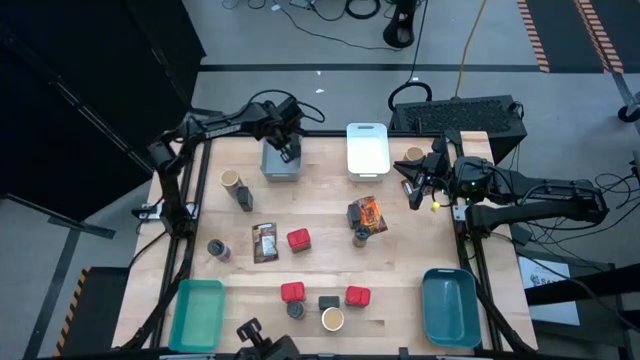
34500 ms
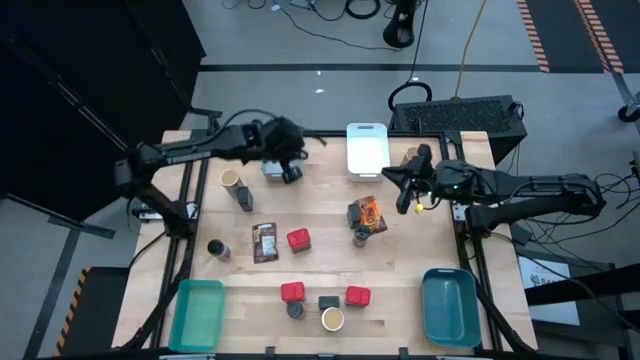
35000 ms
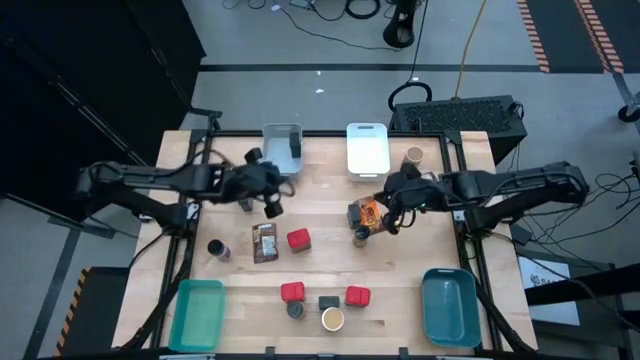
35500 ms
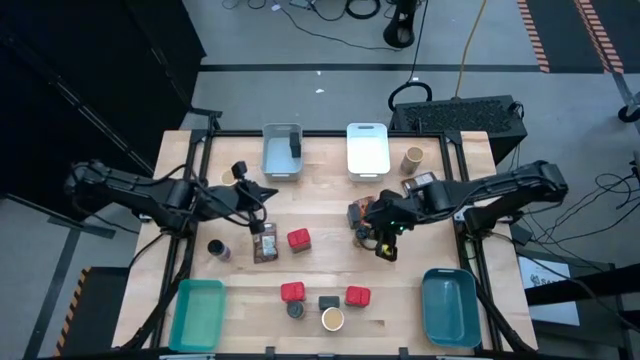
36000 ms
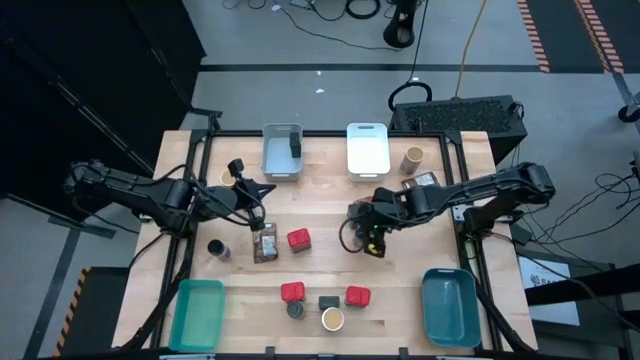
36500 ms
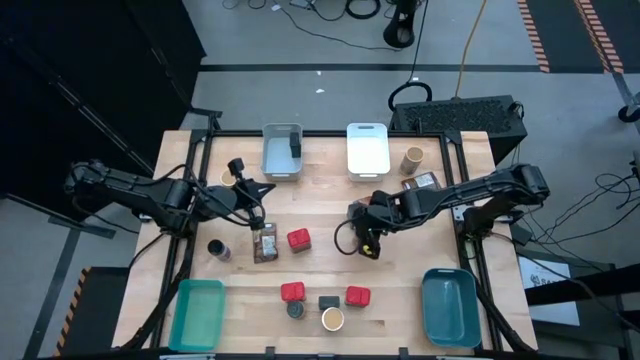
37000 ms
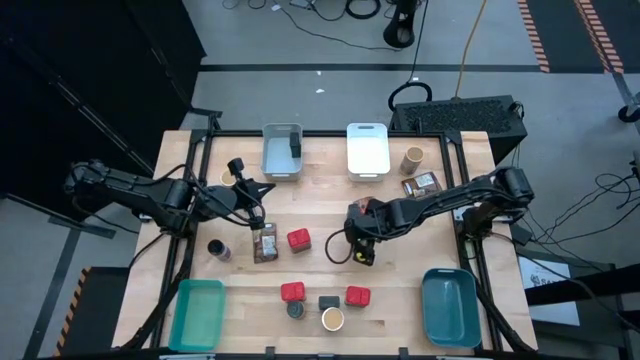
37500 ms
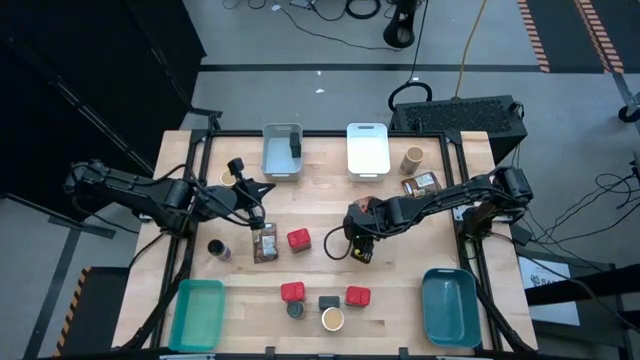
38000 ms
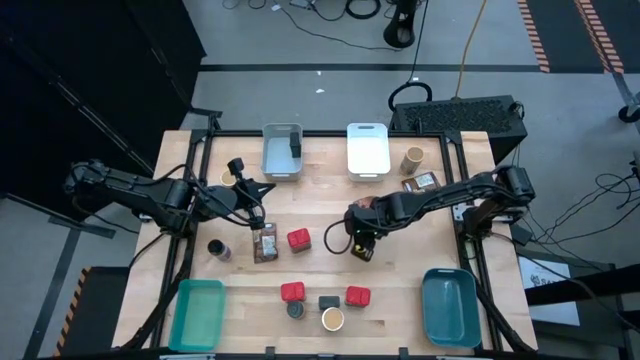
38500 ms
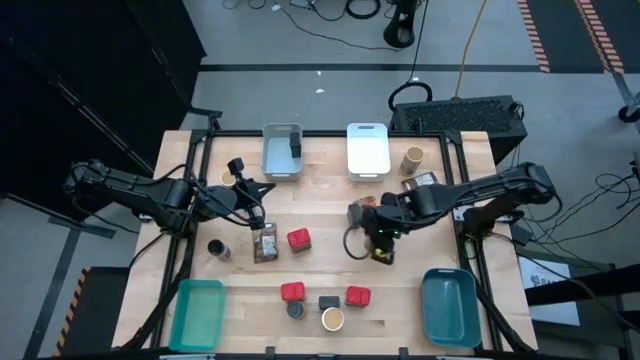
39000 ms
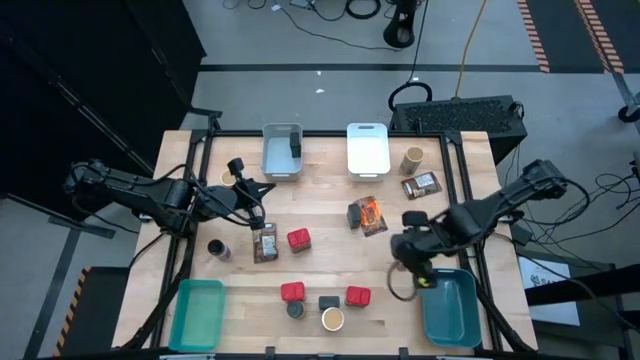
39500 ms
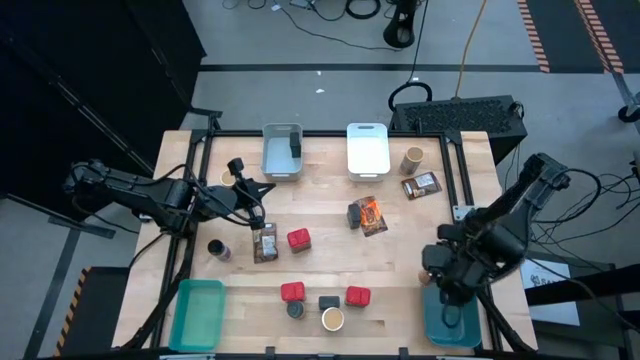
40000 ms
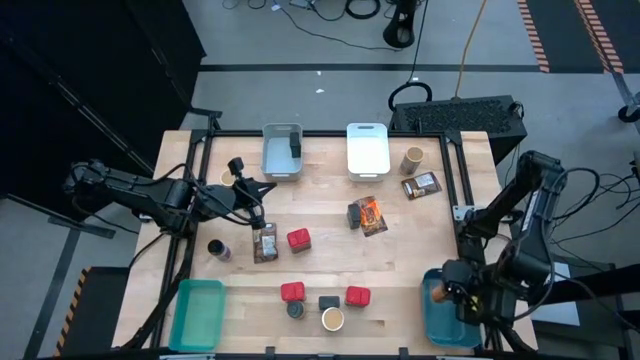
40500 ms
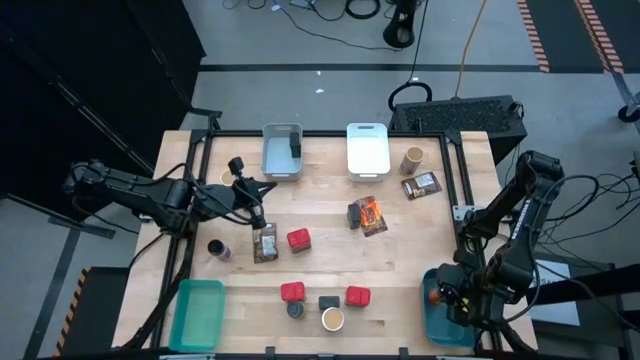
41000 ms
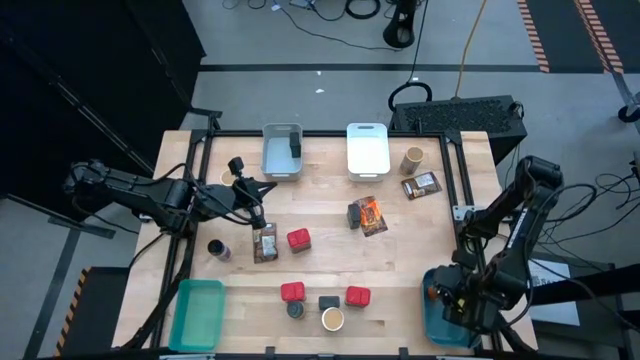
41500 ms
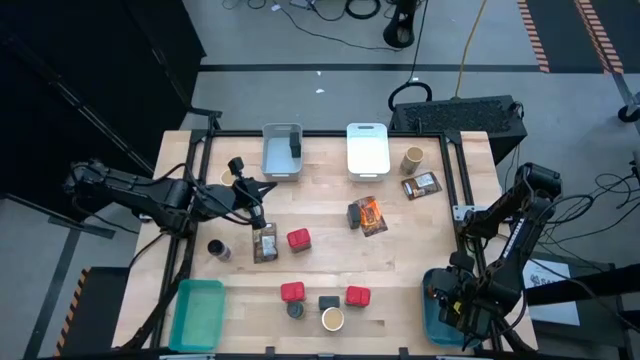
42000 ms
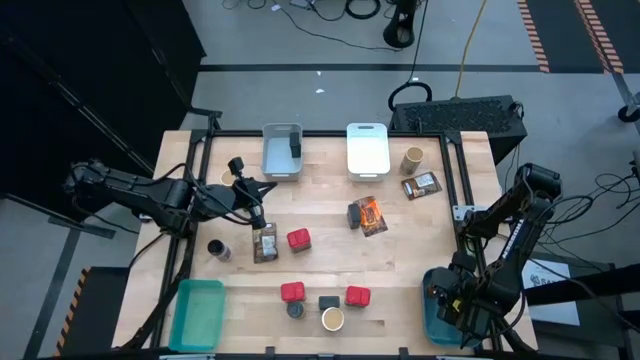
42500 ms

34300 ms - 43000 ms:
Task: Sort spices by type
Put the black spice bottle into the gray bin

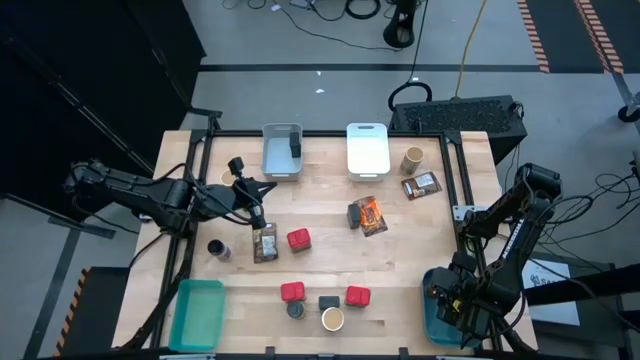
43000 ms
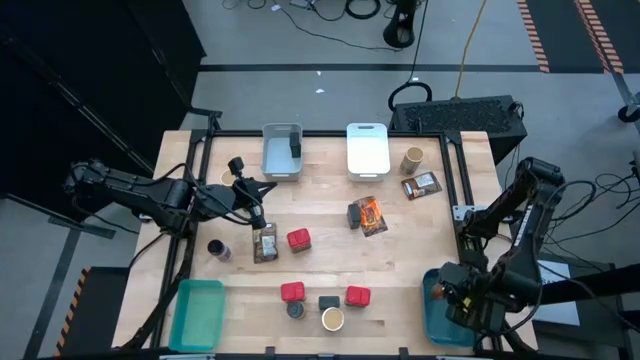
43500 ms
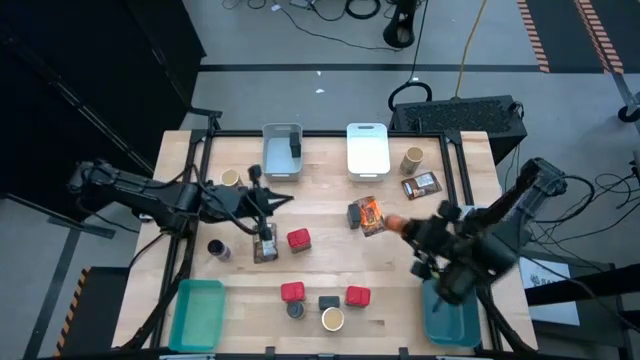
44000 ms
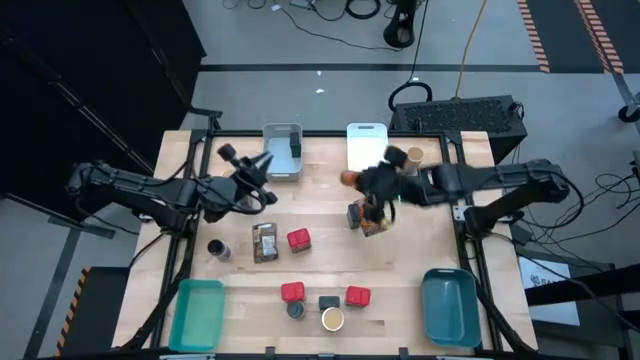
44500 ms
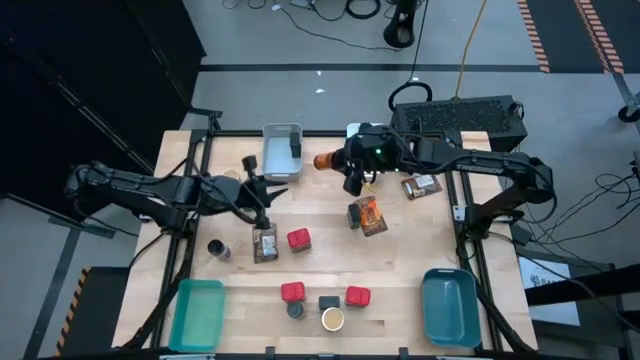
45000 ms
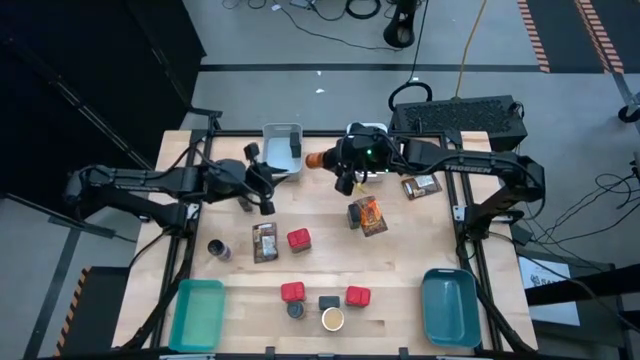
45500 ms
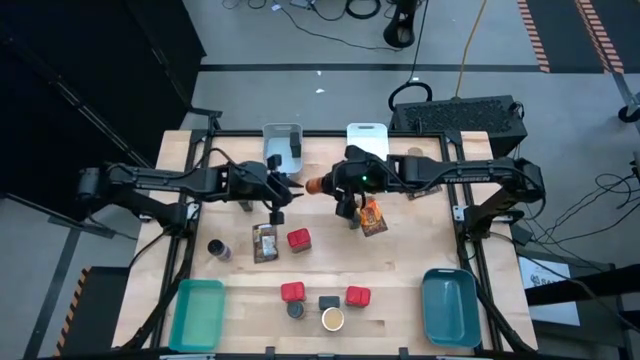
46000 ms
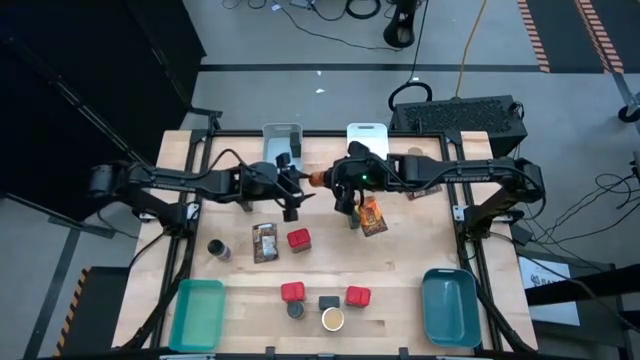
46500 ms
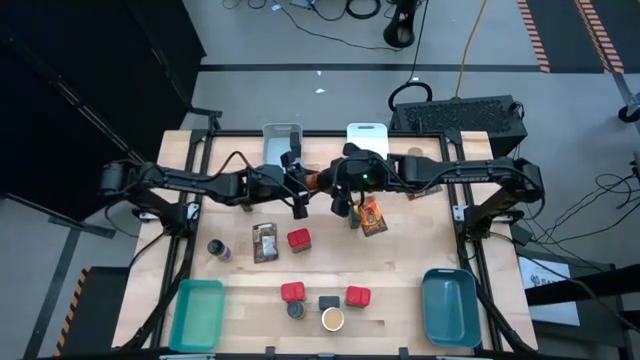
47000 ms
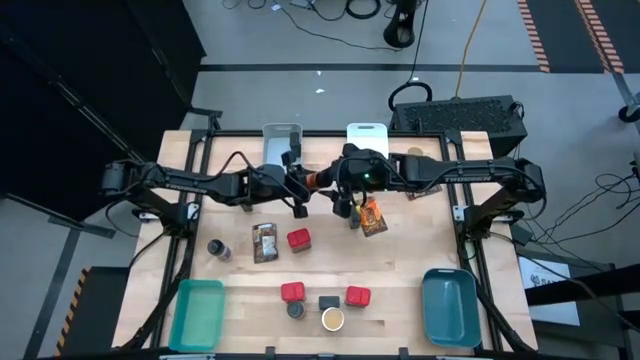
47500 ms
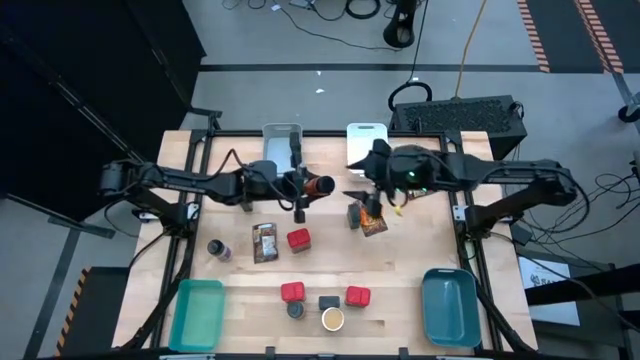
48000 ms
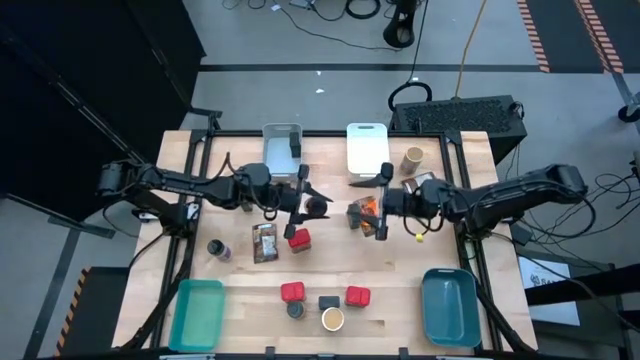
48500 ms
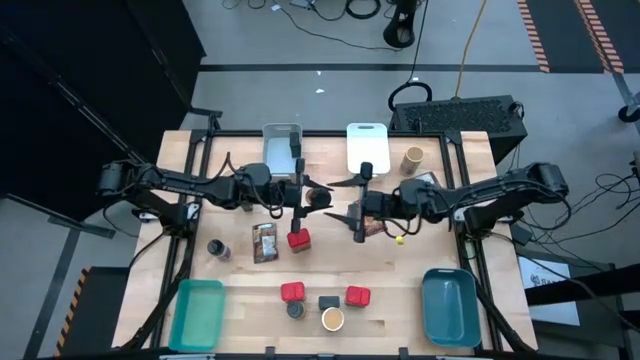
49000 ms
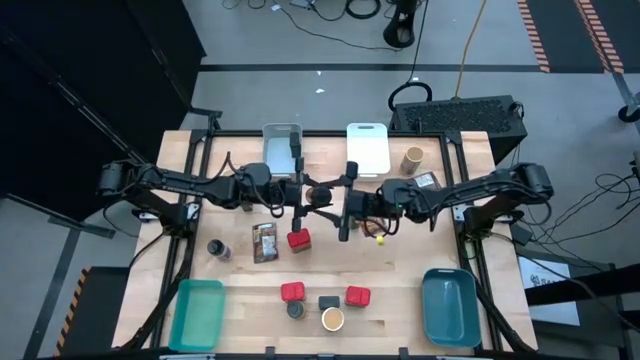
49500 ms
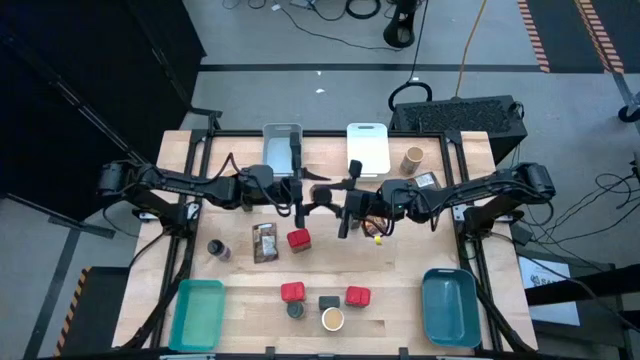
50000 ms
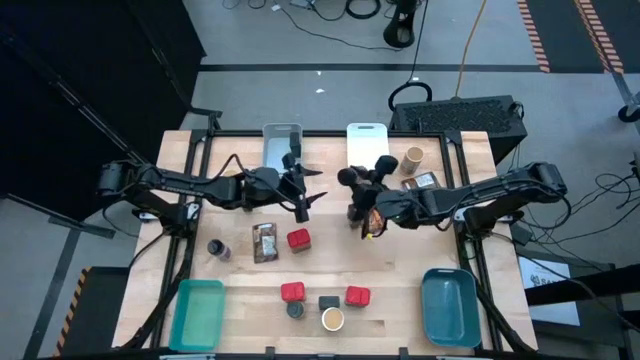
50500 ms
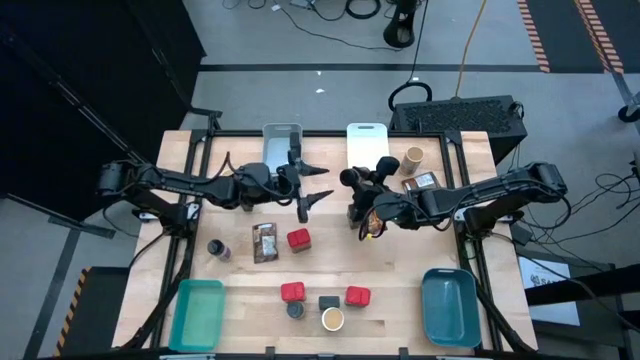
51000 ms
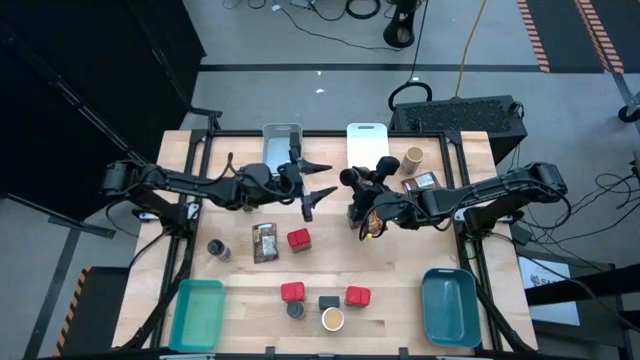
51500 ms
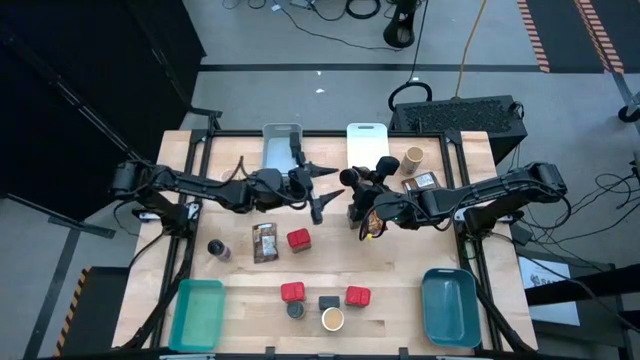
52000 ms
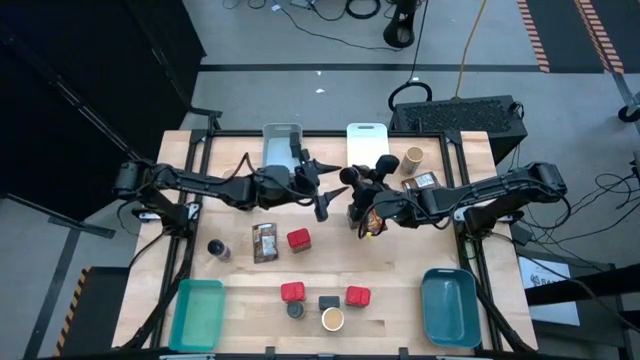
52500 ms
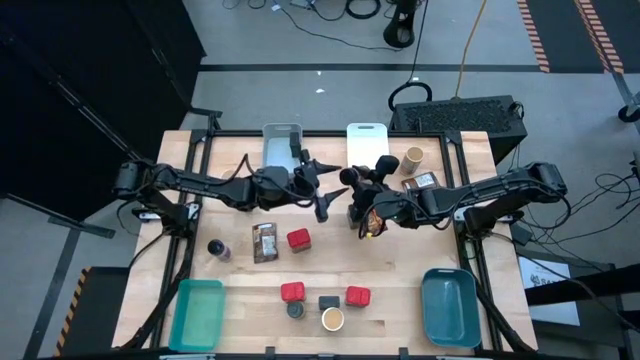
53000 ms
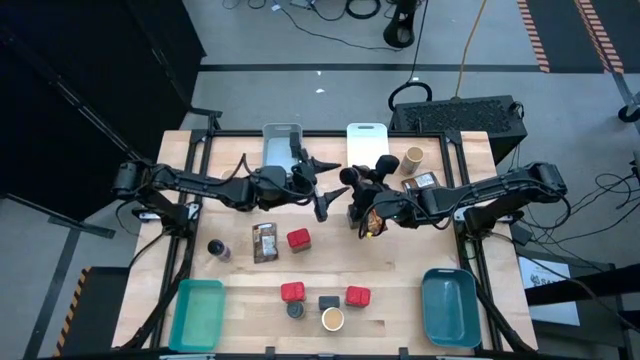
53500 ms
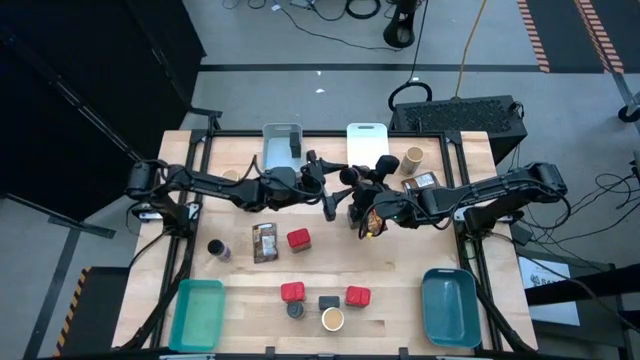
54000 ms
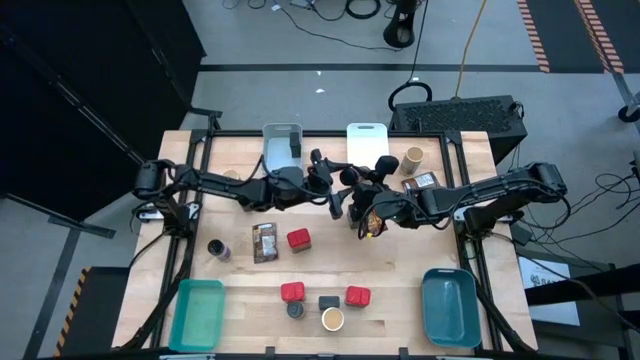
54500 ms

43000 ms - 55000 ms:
Put the black spice bottle into the gray bin

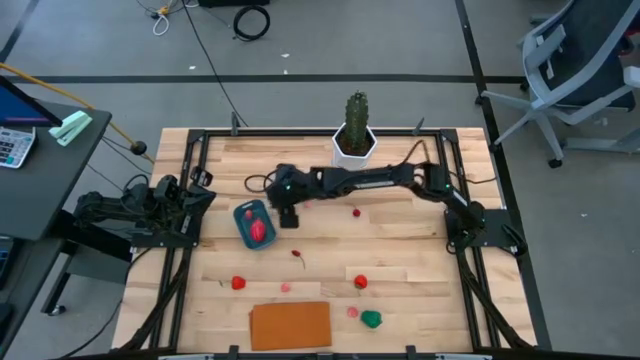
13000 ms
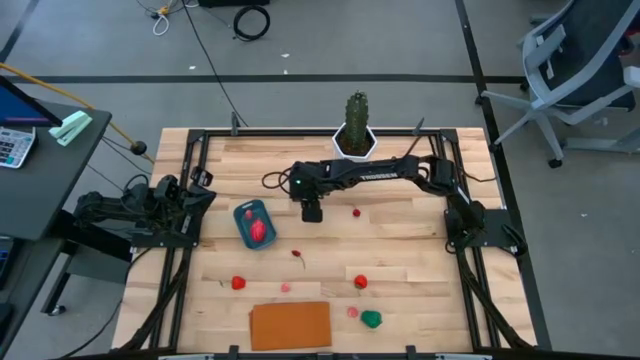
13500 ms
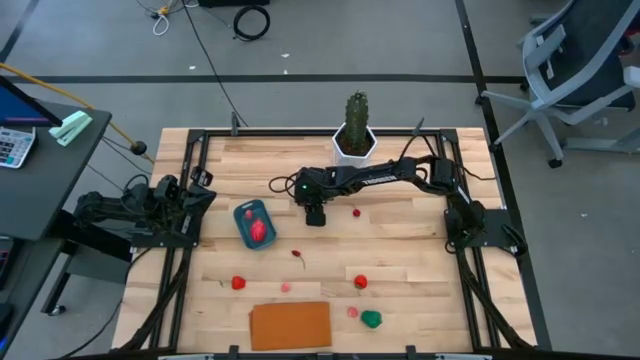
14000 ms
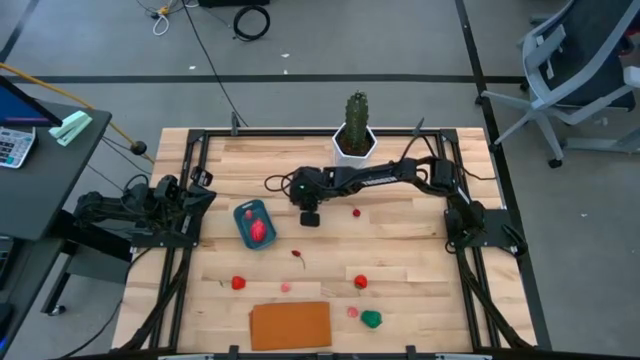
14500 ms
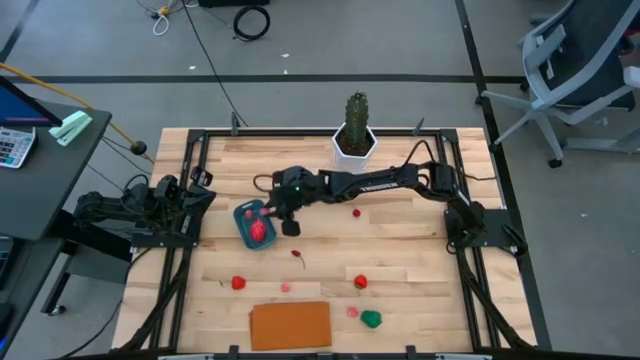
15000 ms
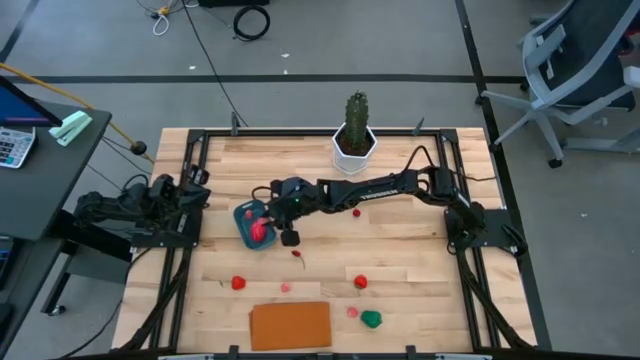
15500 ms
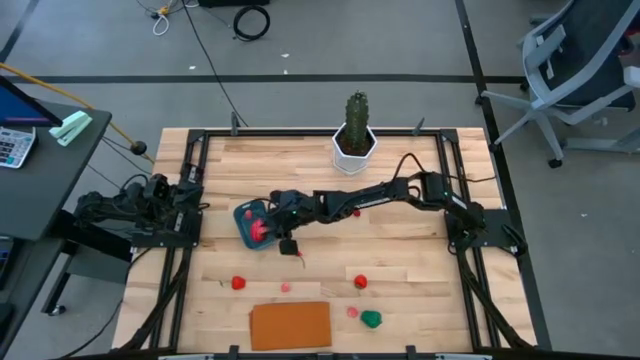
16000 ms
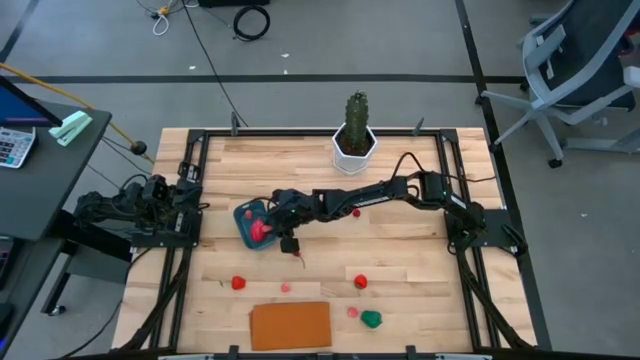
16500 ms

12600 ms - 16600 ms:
Task: Pick and placing Produce into tupperware
Put the peach into the blue bin
